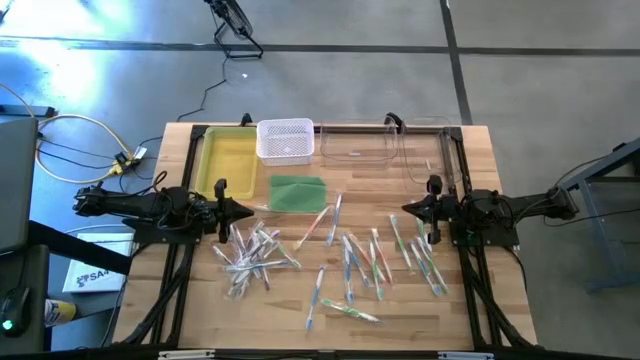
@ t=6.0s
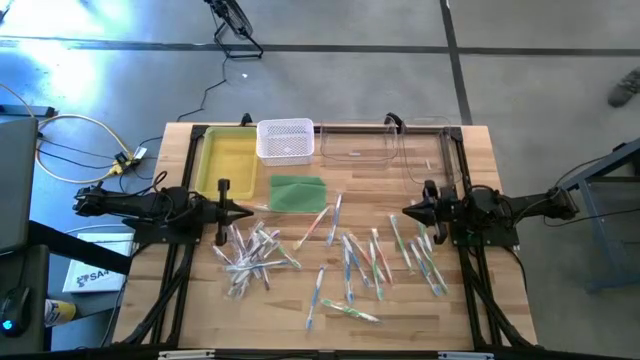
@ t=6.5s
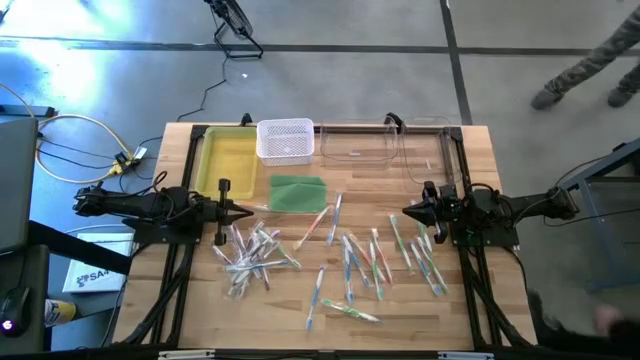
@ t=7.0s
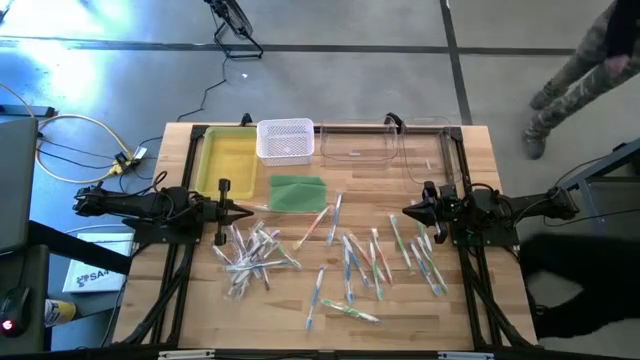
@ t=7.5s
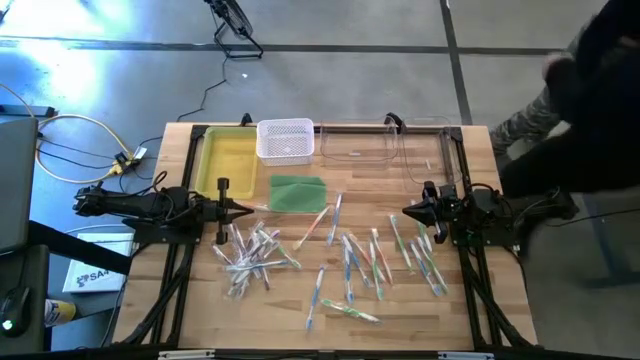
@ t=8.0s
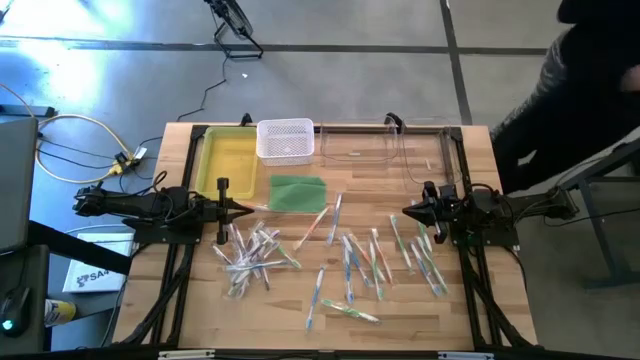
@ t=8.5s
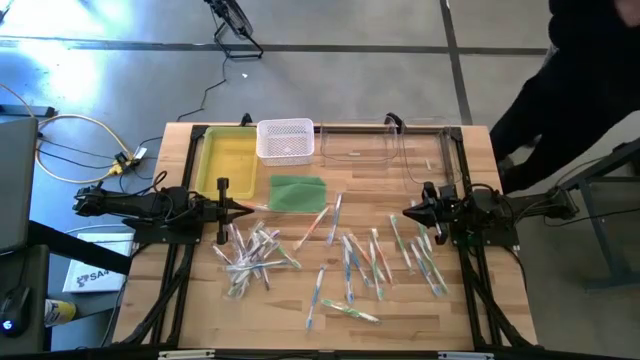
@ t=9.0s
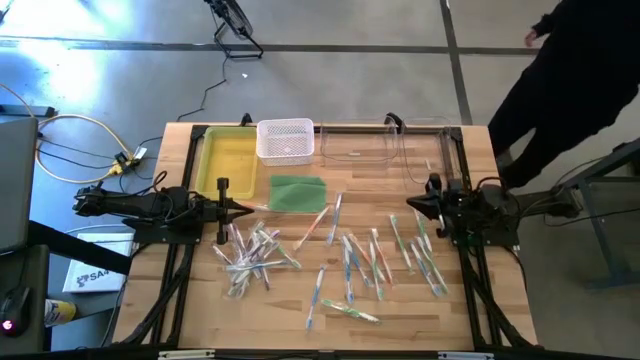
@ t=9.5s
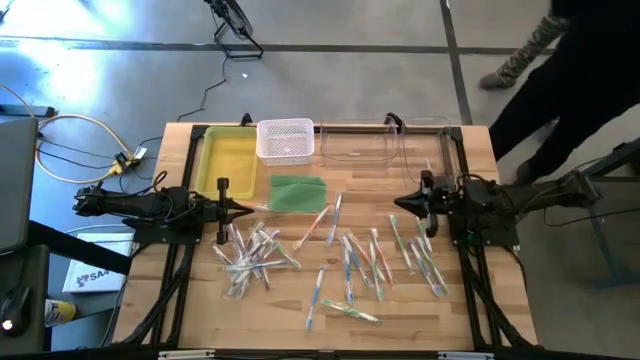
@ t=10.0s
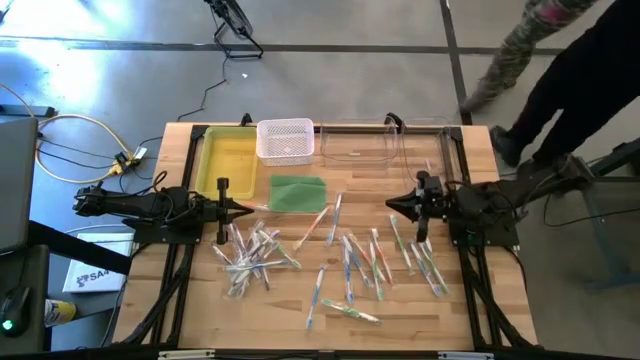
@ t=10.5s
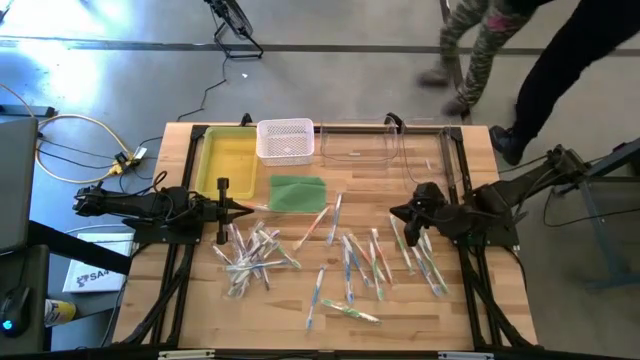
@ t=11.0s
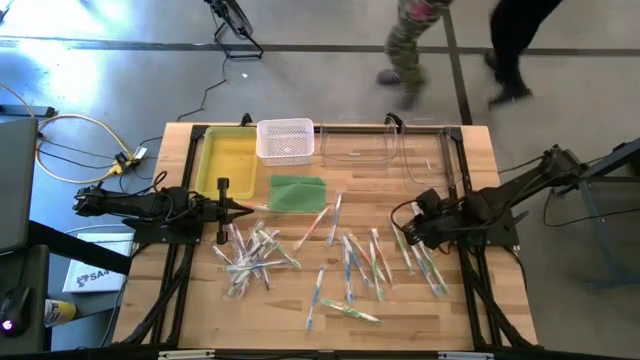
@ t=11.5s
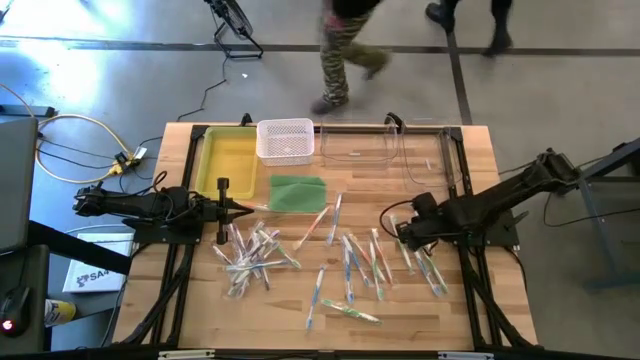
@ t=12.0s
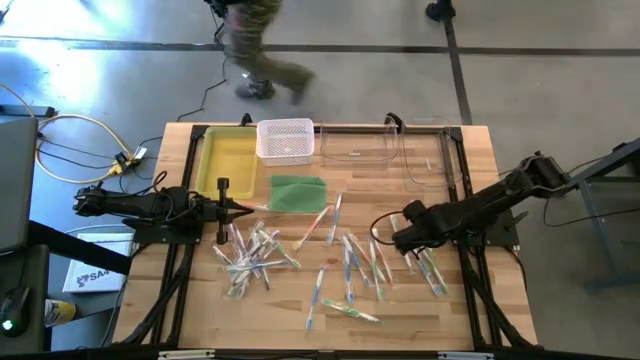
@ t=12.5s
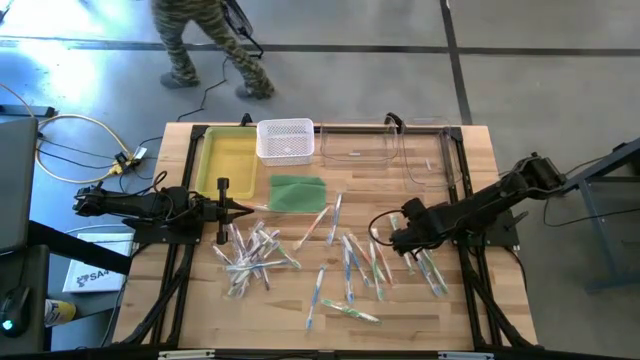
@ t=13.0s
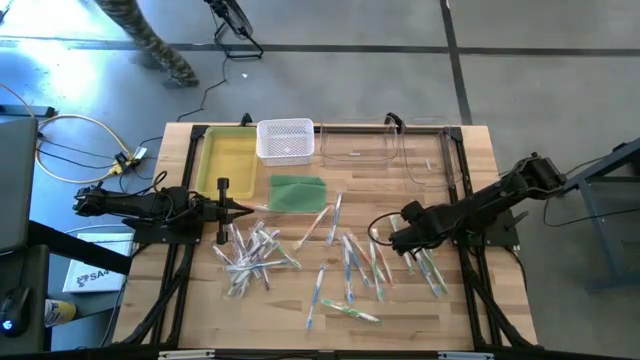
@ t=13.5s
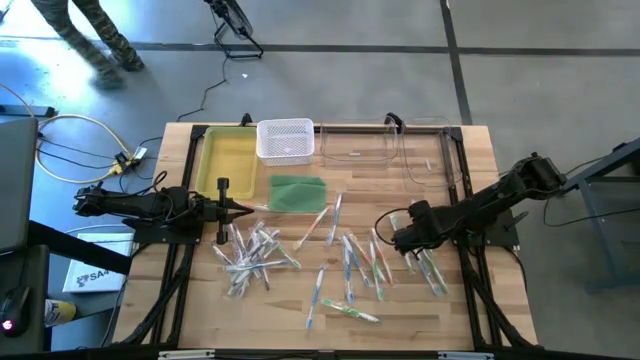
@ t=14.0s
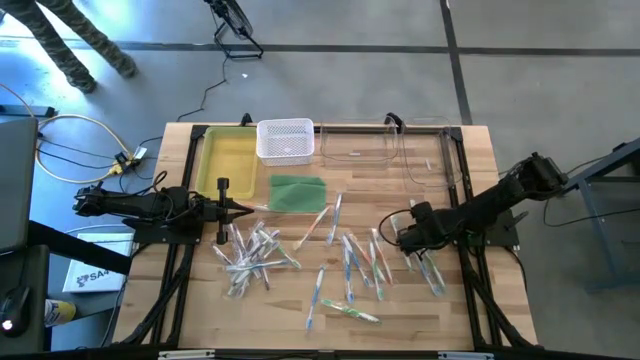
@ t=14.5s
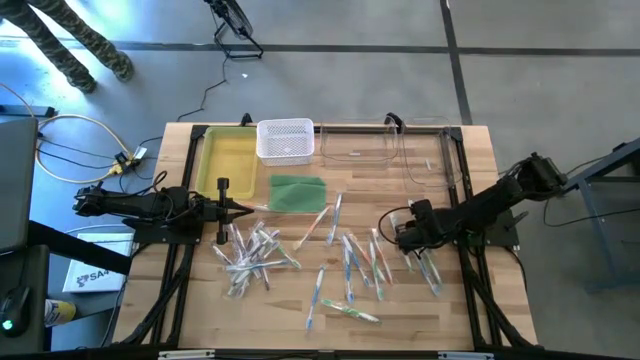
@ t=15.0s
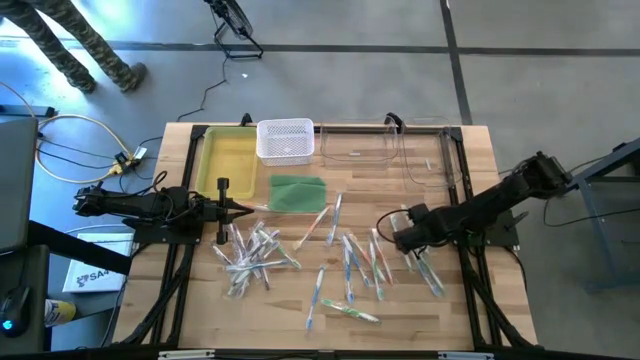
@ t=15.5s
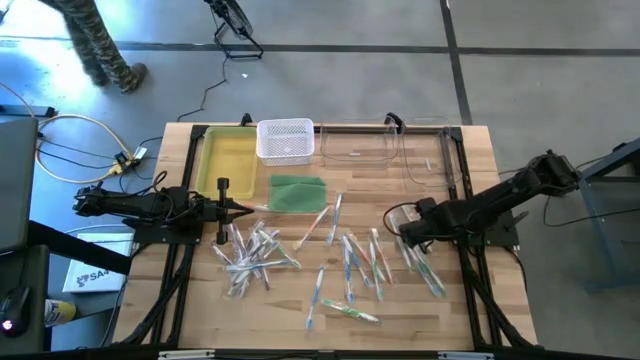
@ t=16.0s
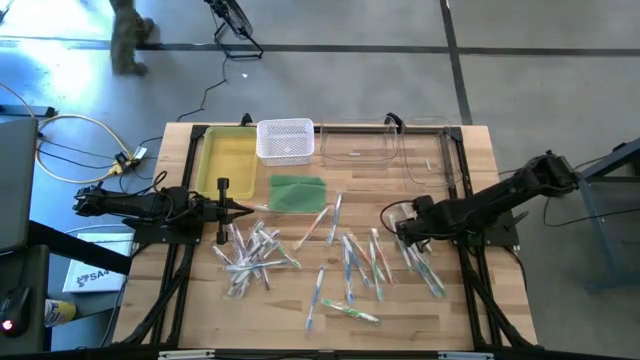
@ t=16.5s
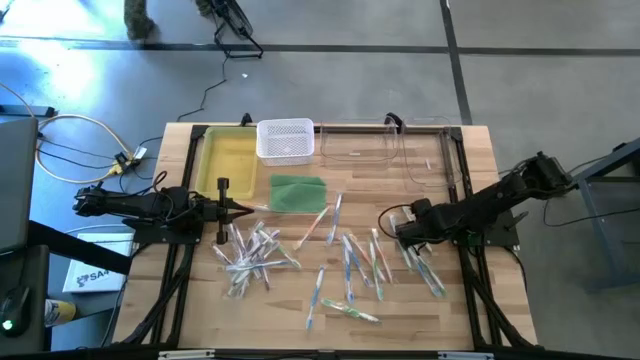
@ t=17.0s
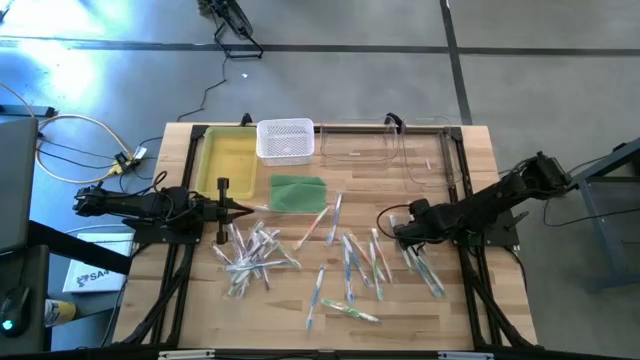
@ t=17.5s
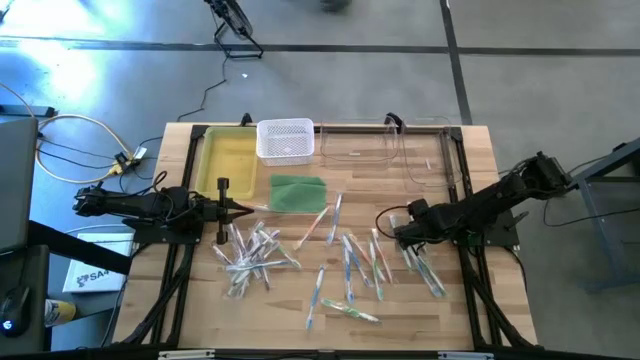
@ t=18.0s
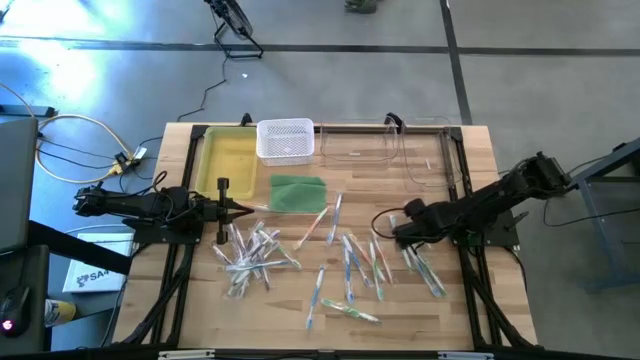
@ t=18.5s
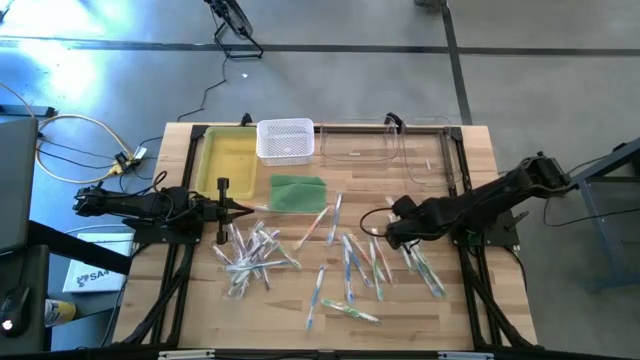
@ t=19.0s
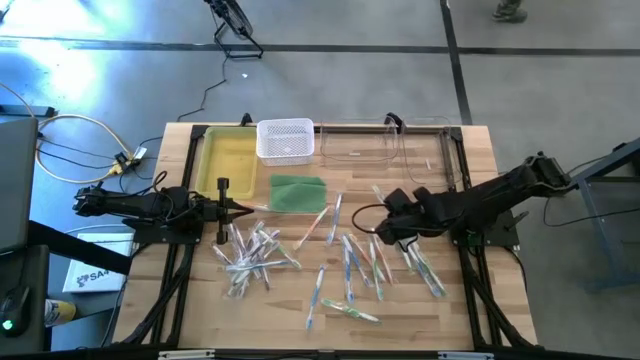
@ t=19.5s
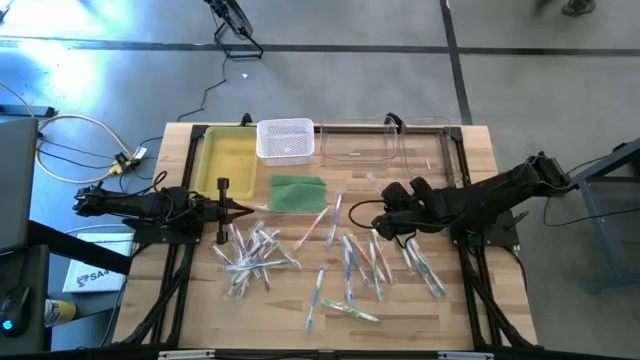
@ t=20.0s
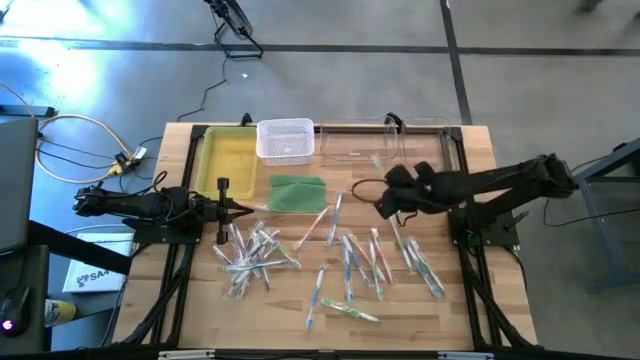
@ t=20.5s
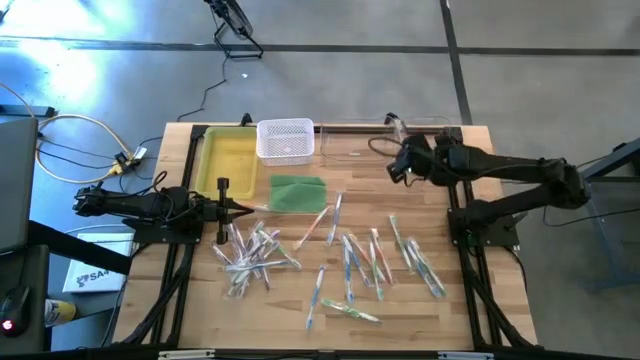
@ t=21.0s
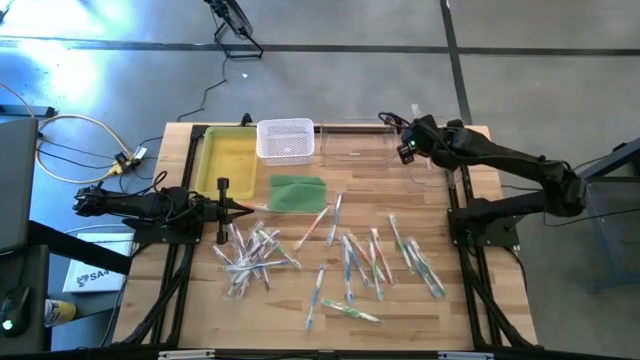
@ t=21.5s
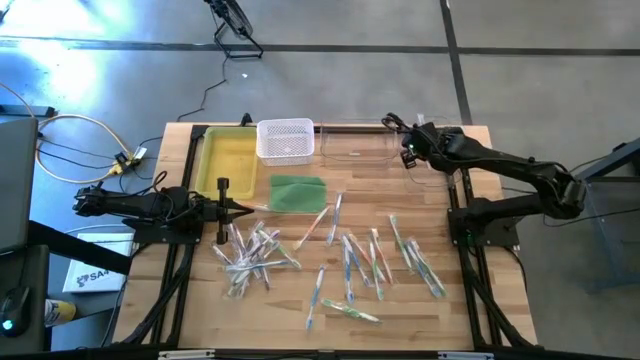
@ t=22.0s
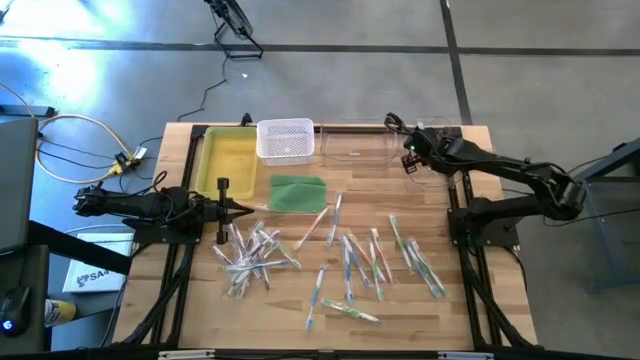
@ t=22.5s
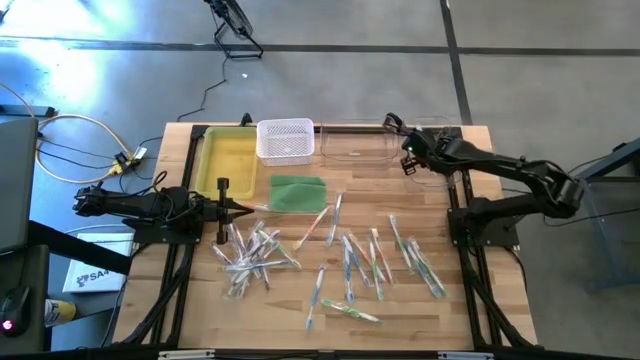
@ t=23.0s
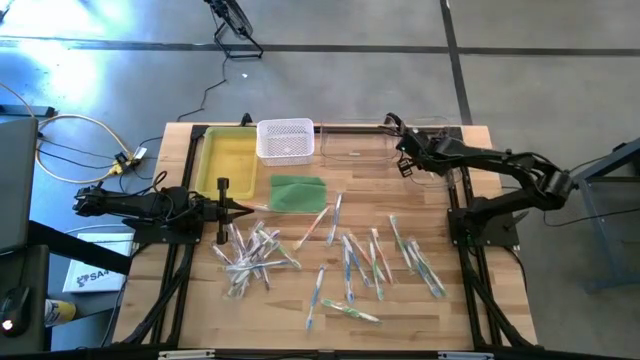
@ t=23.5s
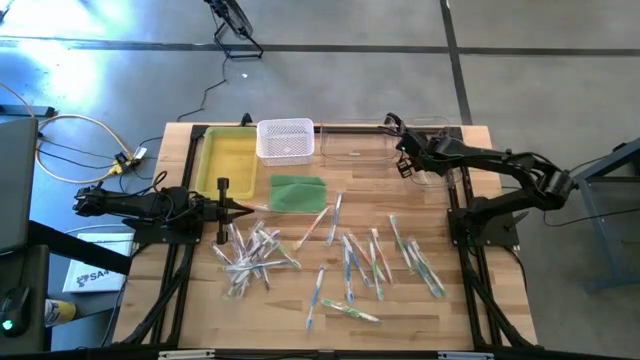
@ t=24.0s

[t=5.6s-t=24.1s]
Task: Pick & Place Toothbrushes
Put the green toothbrush into the right transparent bin

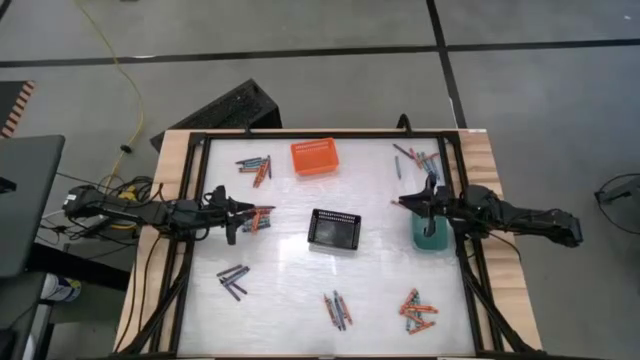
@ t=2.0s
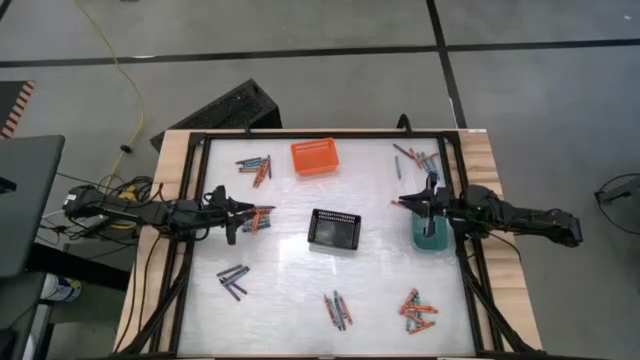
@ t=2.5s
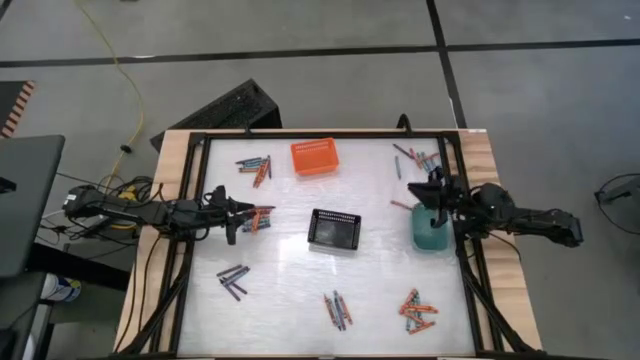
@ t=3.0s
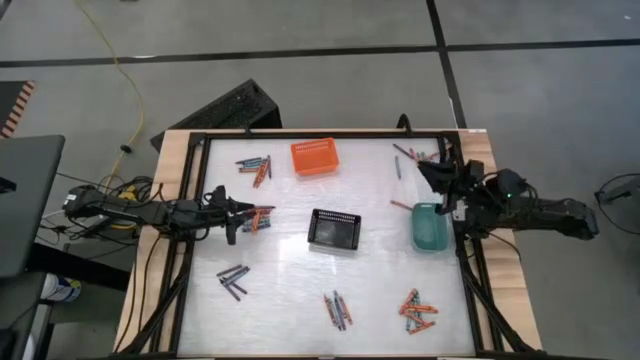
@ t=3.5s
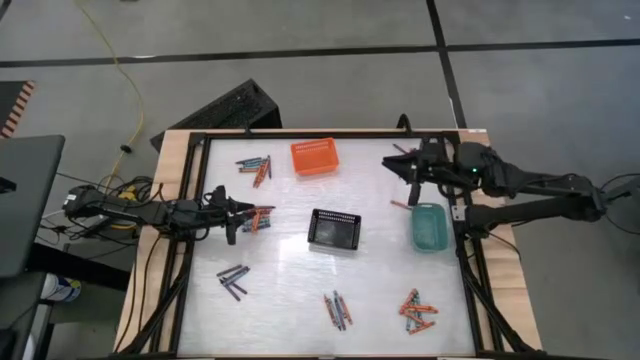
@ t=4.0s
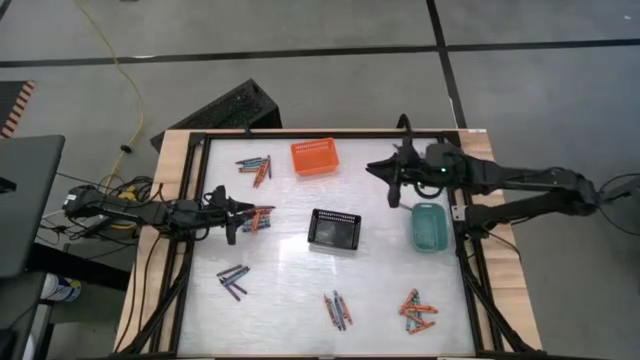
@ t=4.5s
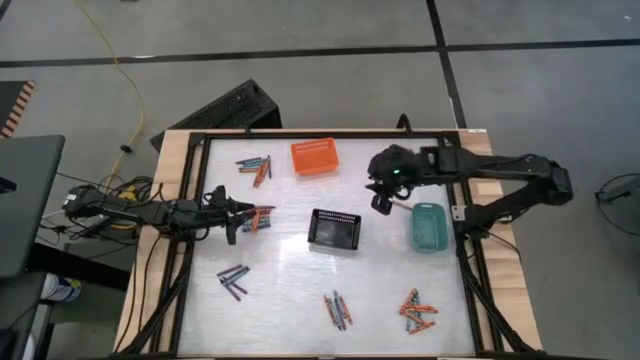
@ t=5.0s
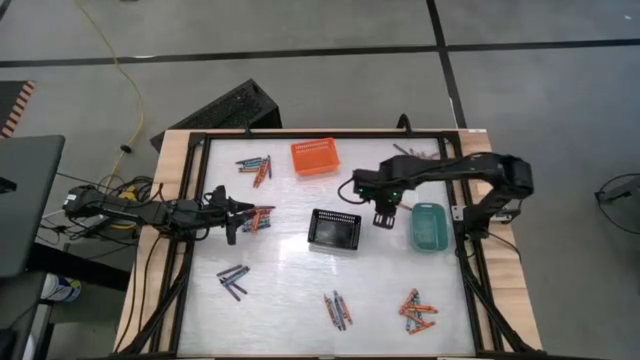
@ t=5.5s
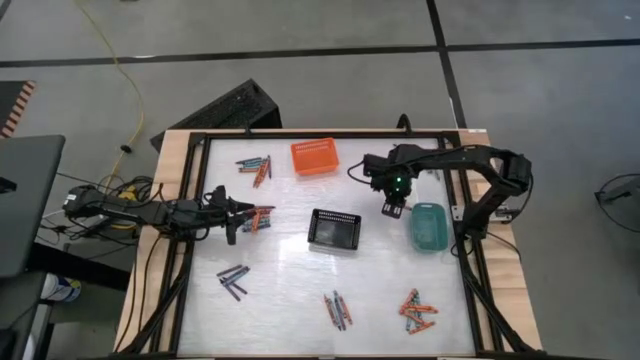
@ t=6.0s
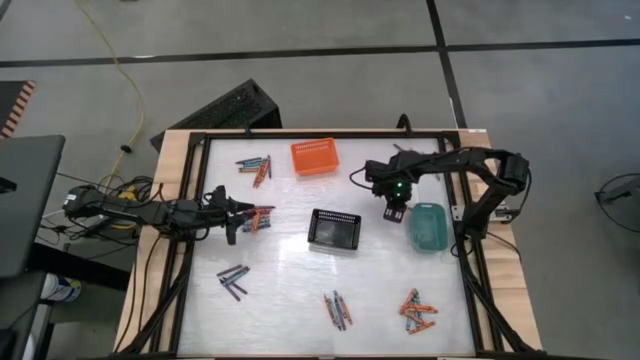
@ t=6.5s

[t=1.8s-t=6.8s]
Task: Sort crayons
Put the orange crayon into the orange bin
